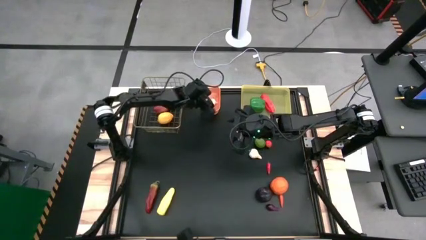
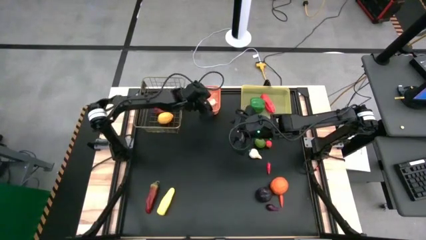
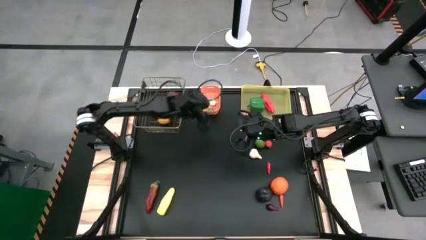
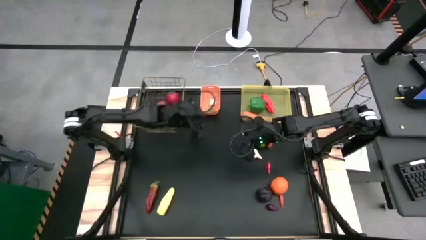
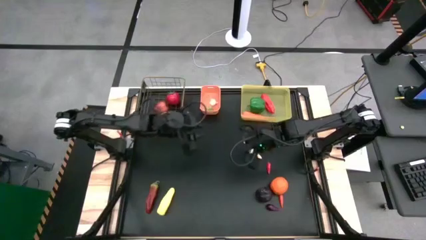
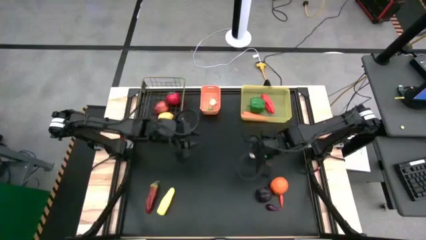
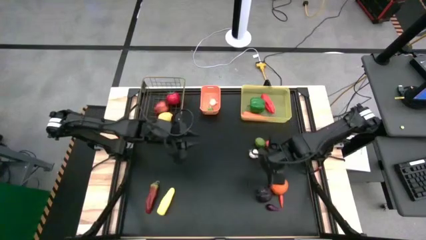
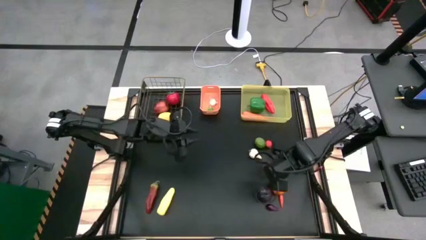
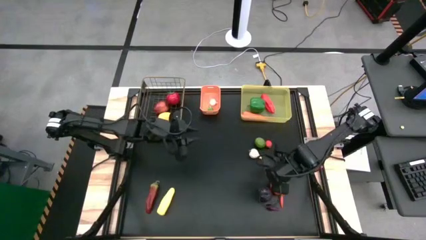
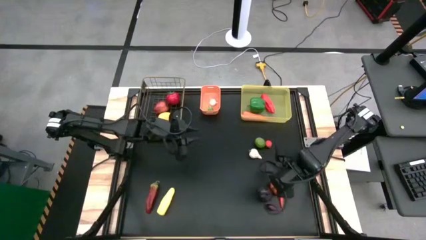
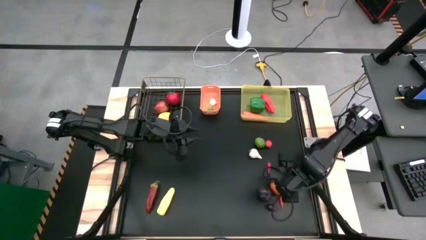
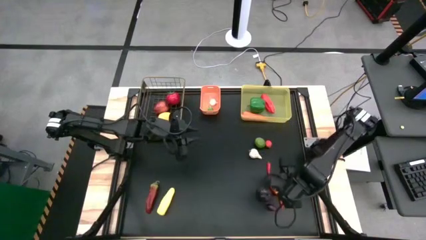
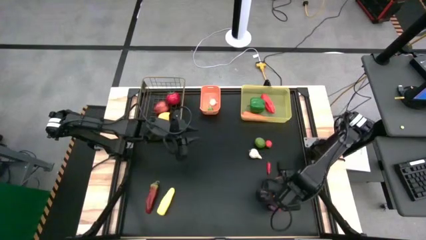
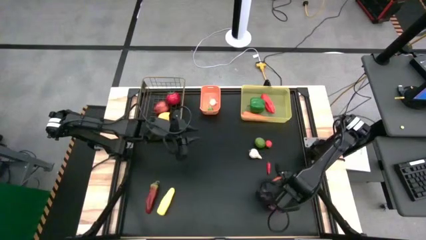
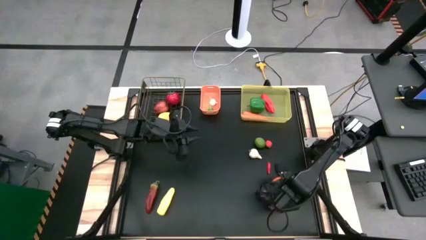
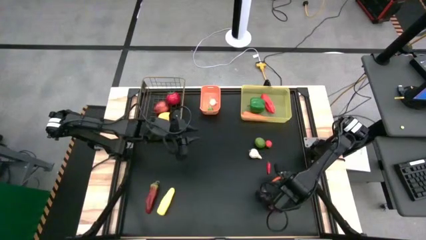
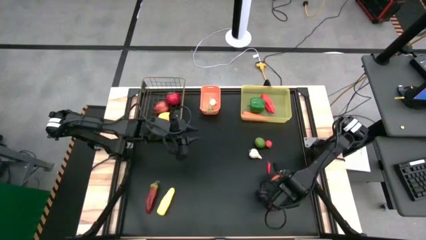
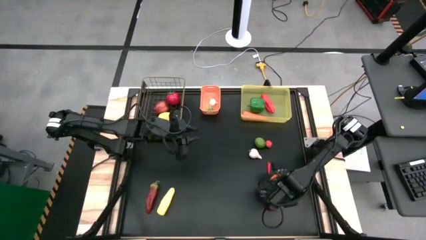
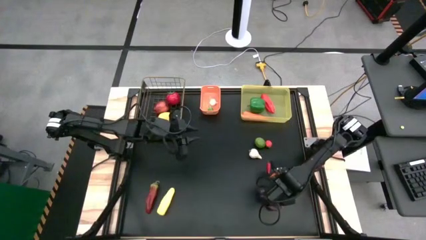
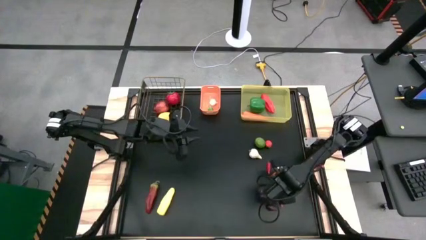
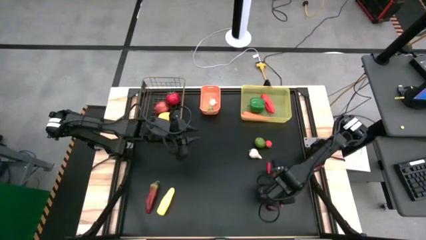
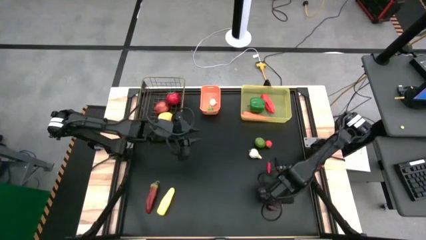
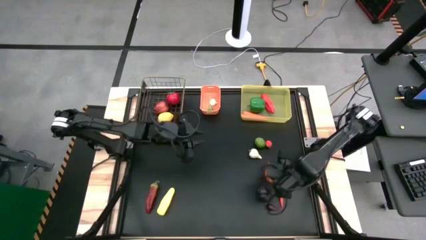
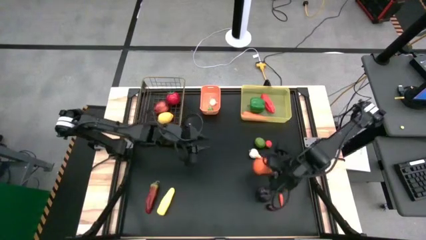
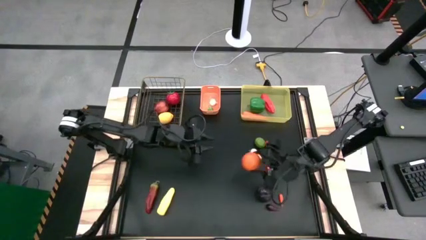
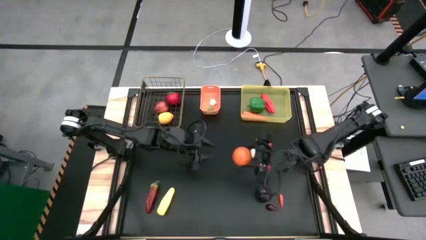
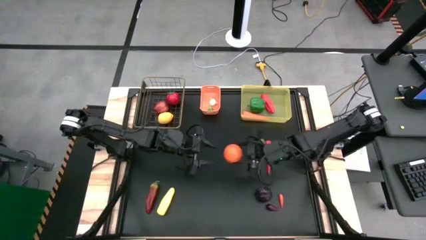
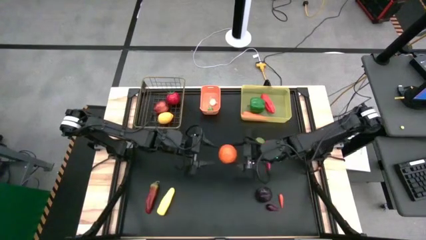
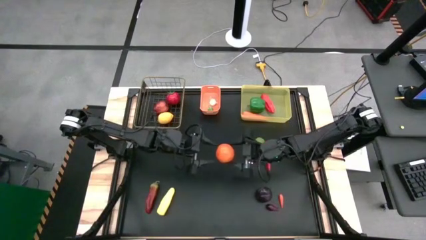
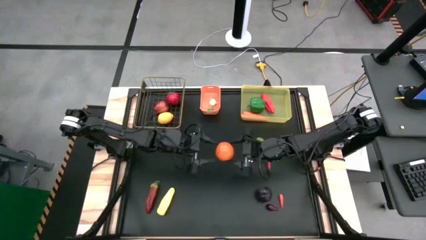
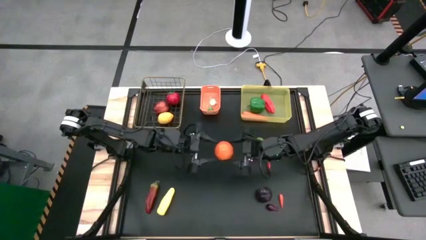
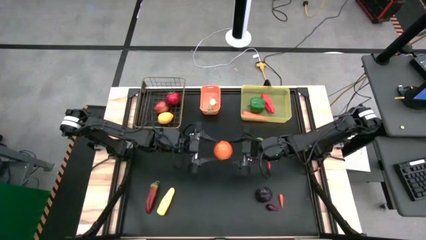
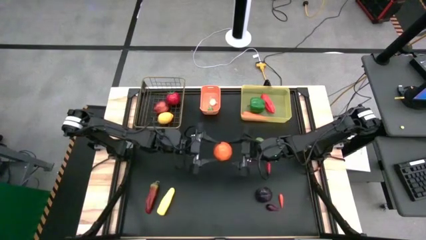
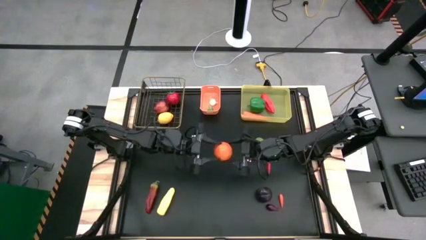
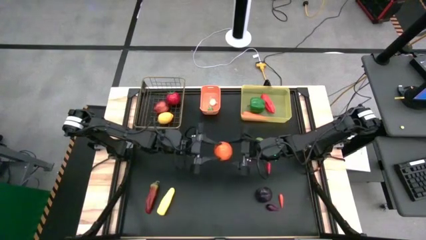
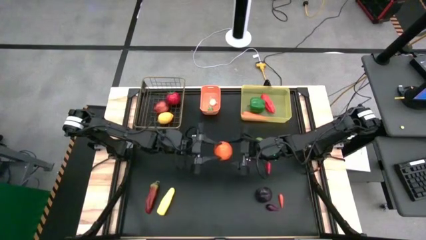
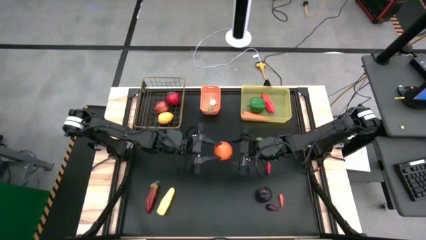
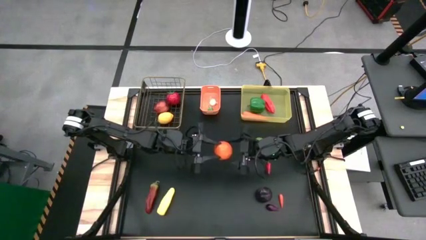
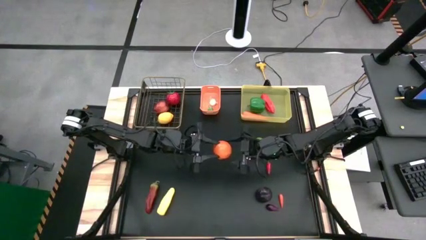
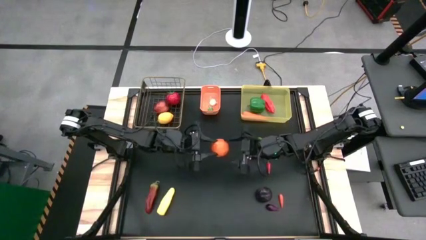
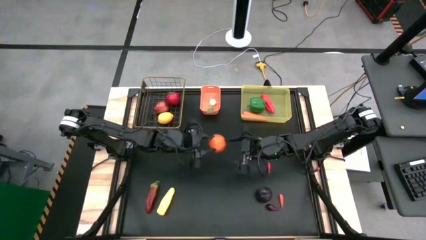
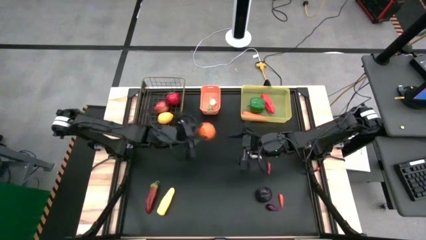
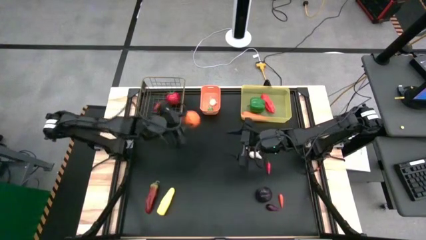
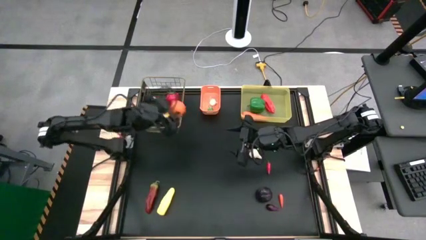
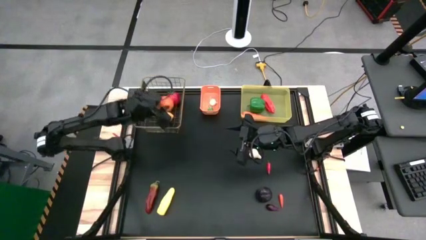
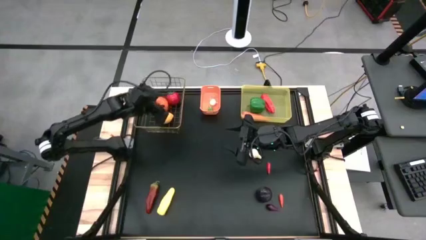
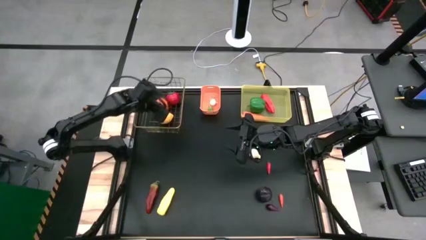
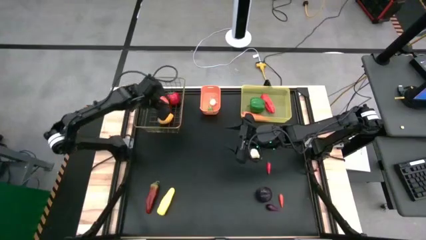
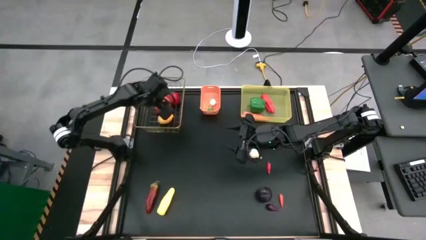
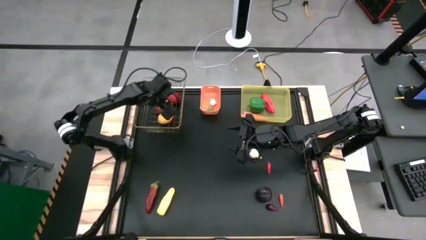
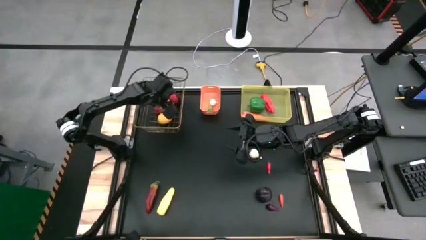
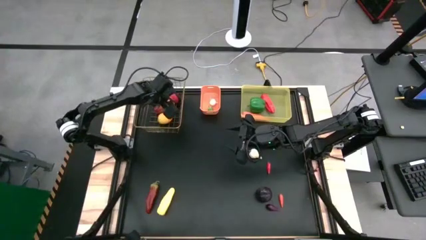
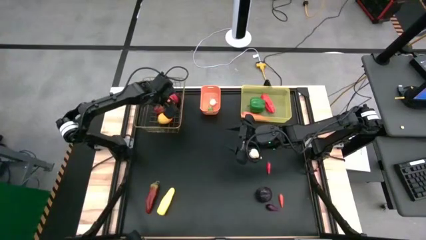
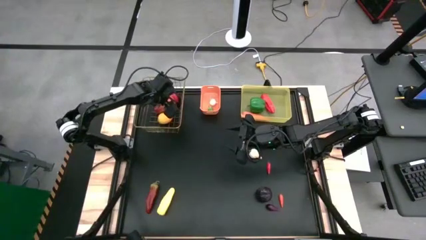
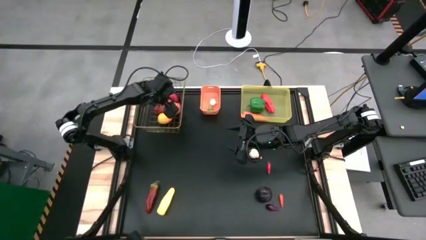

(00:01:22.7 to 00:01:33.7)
Task: Sort produce into baskets
Put the orange fruit into the wire basket

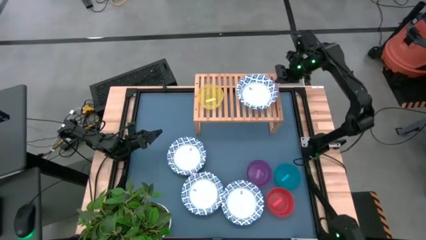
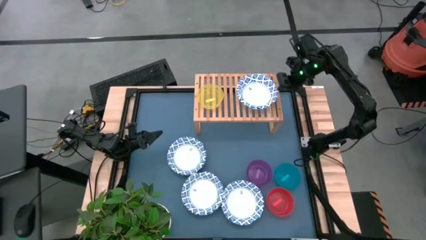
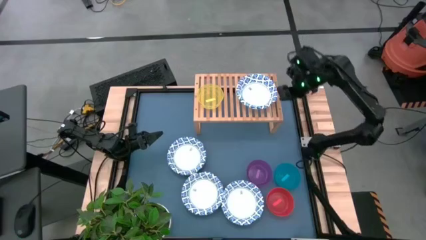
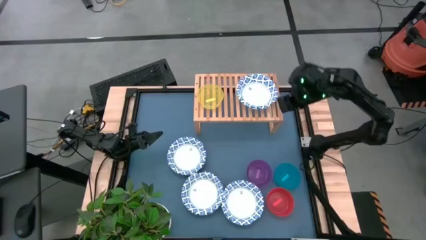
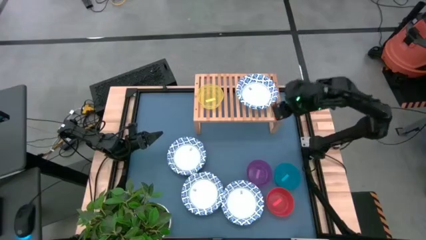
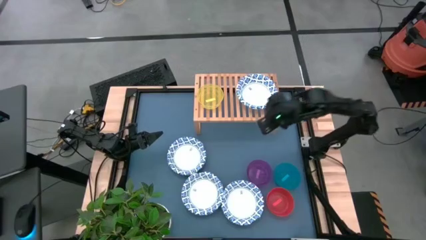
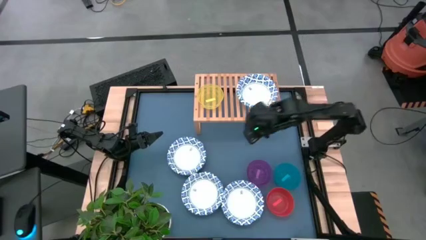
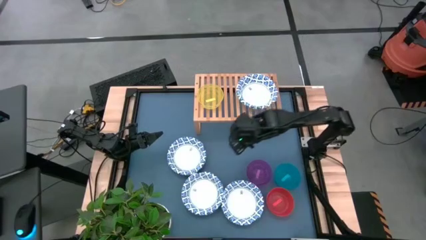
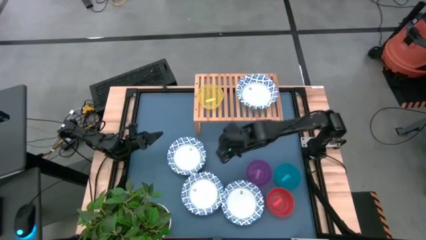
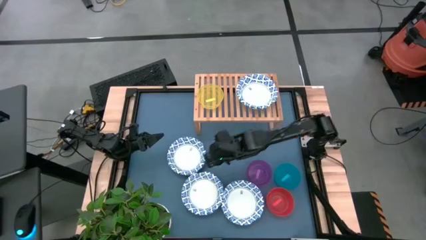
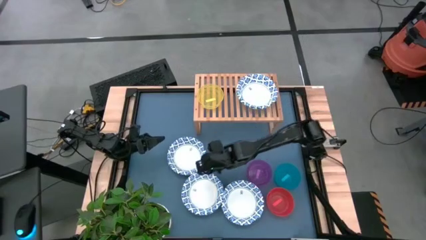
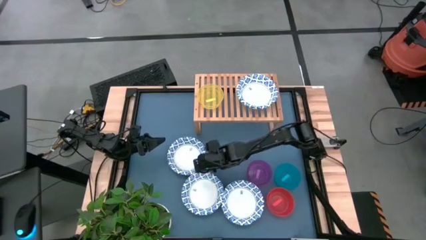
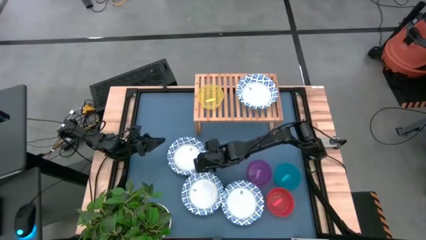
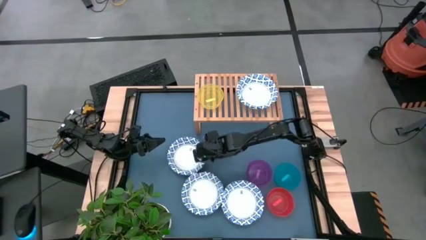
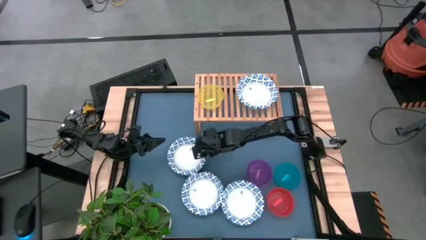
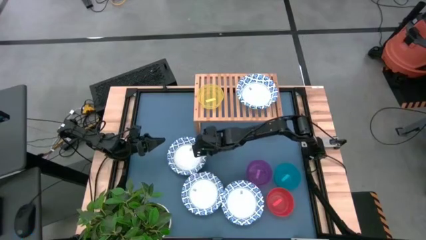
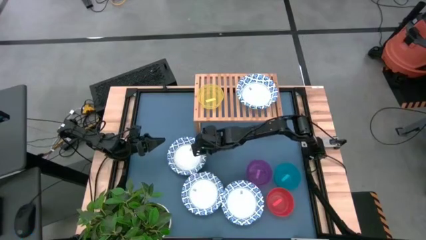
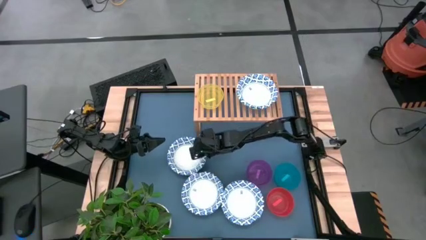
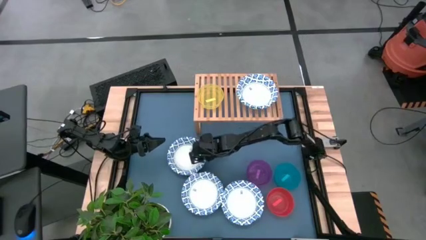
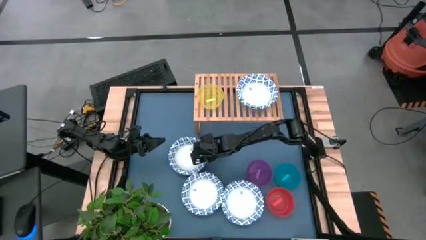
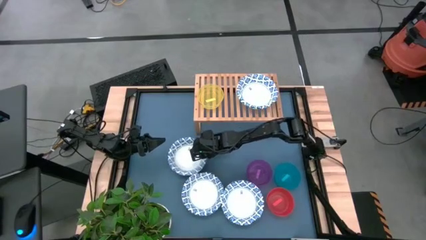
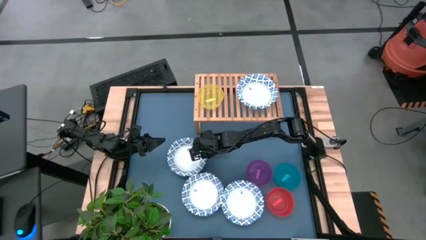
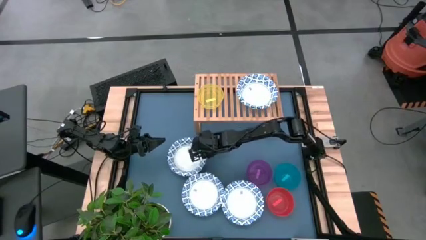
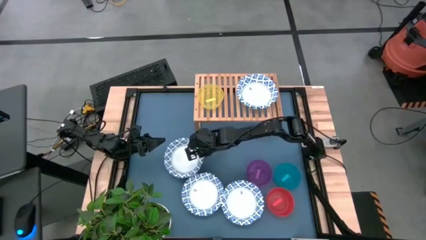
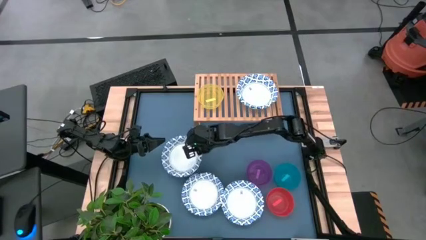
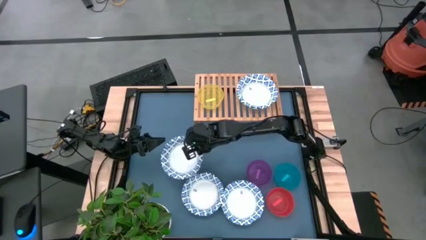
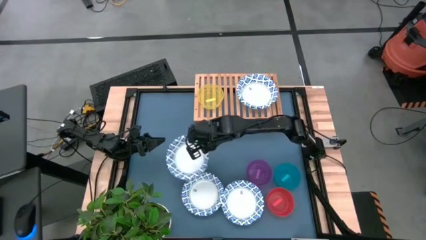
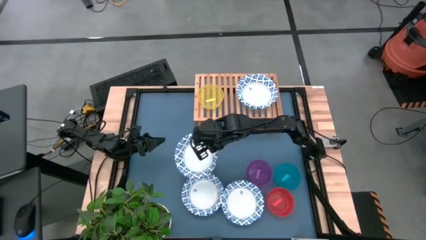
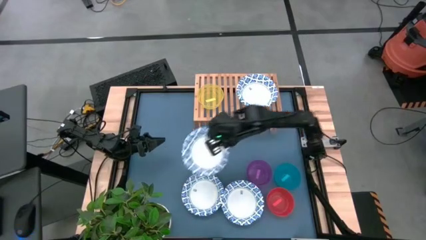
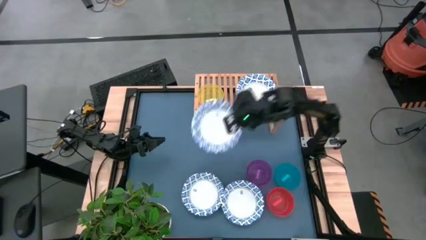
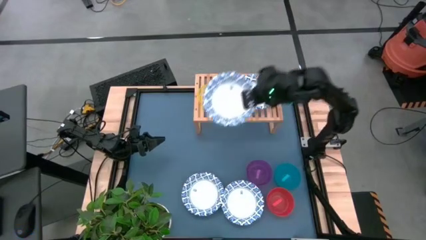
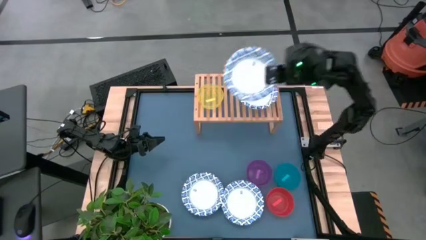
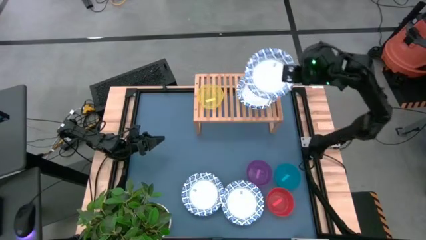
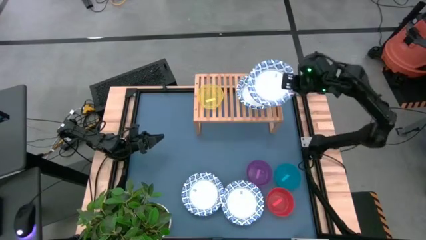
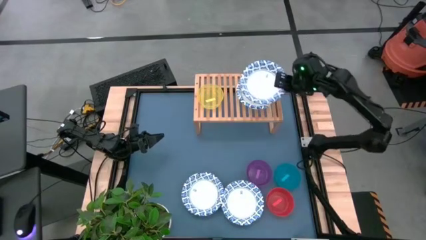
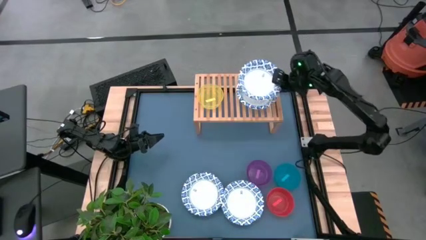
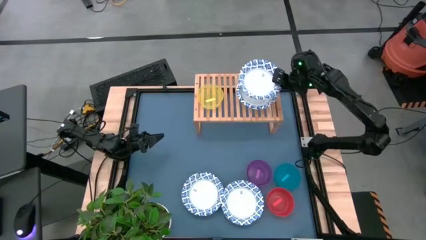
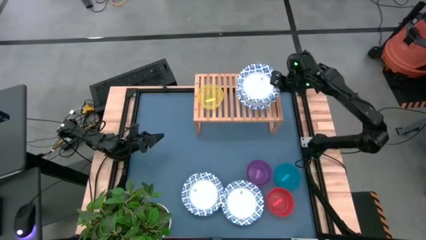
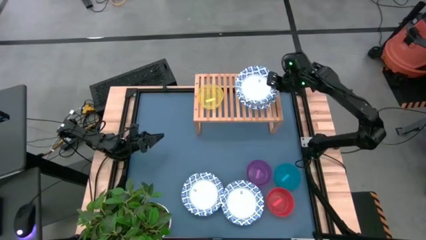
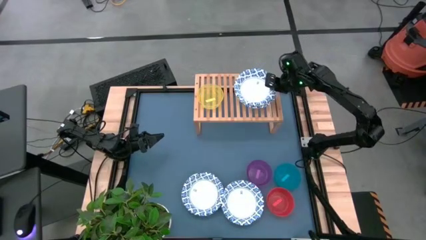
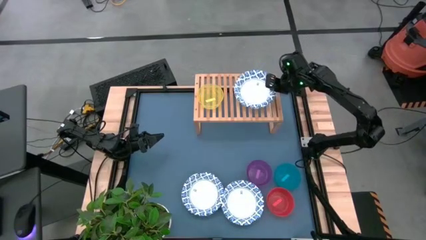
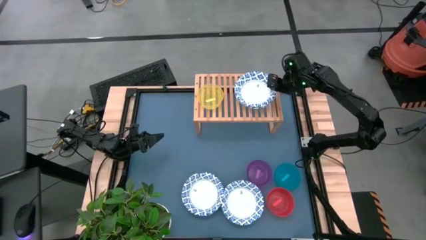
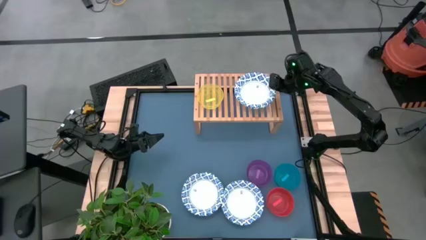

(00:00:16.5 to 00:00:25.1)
Task: Place and stack bowls onto a shelf
Stack the top white bowl on top of the white bowl on the shelf
